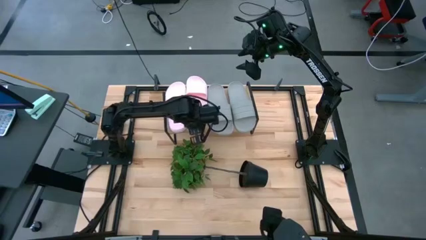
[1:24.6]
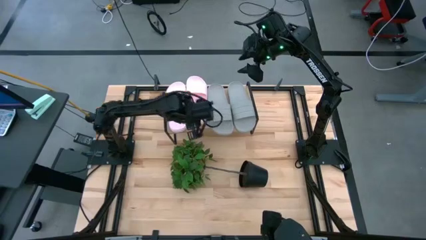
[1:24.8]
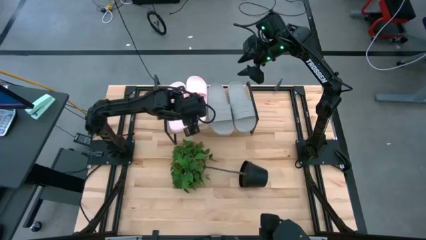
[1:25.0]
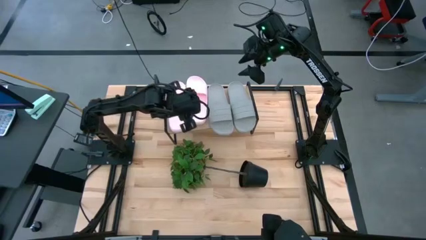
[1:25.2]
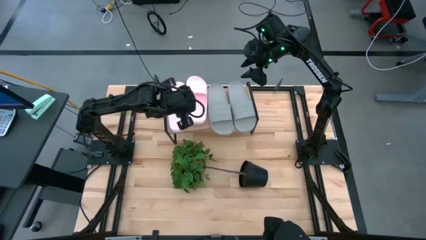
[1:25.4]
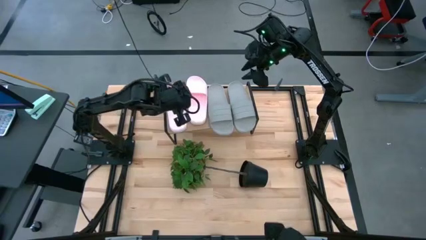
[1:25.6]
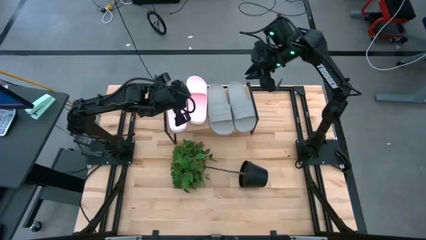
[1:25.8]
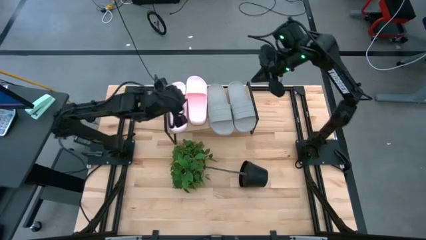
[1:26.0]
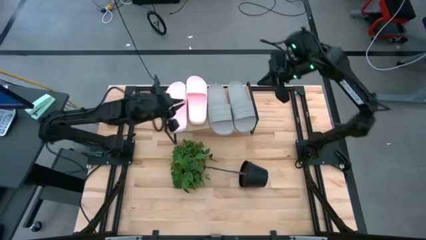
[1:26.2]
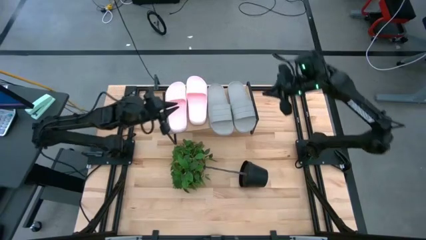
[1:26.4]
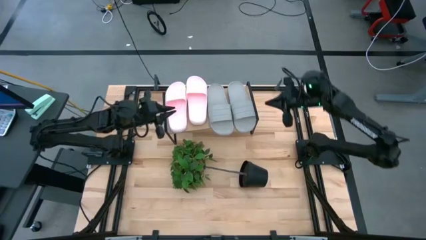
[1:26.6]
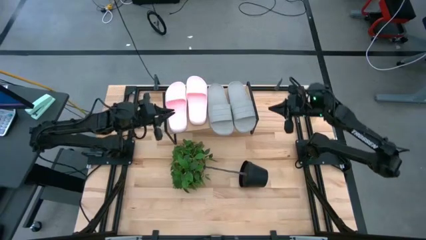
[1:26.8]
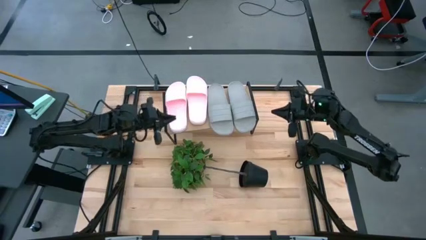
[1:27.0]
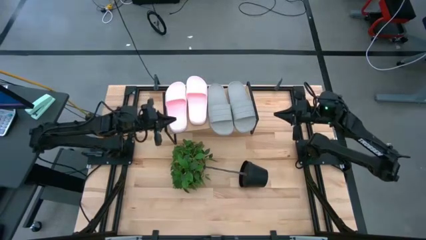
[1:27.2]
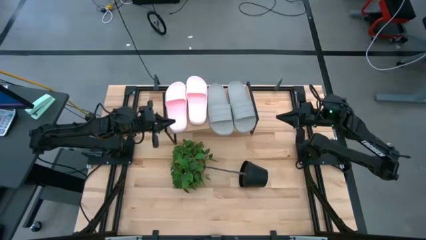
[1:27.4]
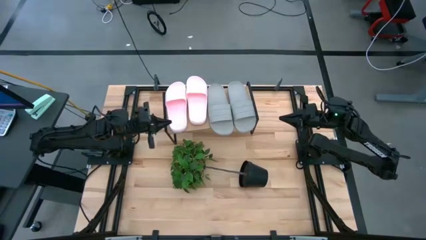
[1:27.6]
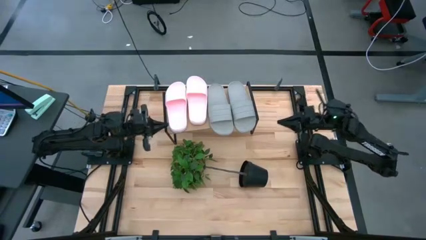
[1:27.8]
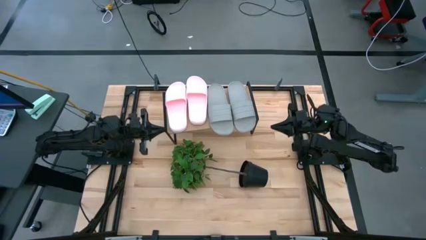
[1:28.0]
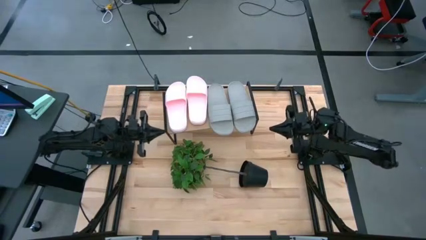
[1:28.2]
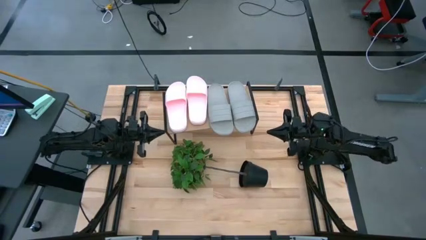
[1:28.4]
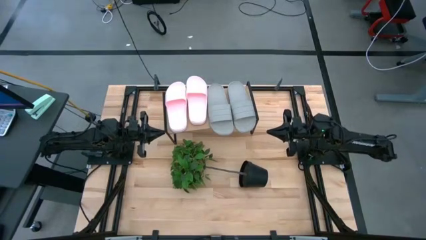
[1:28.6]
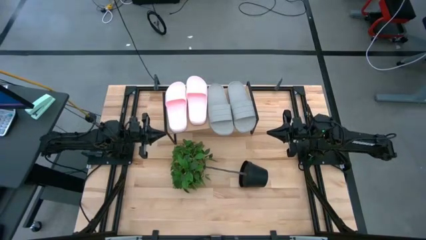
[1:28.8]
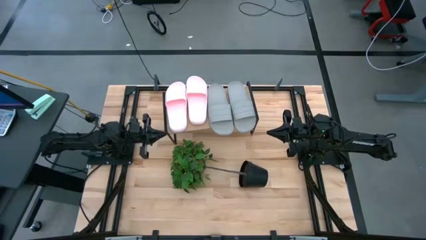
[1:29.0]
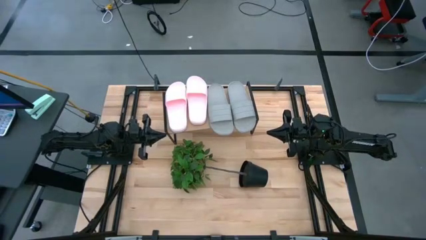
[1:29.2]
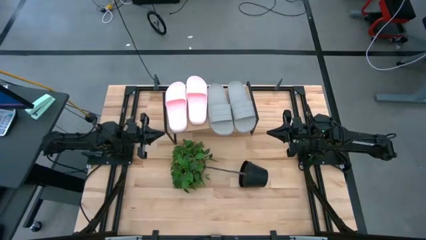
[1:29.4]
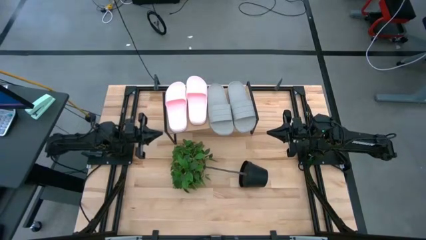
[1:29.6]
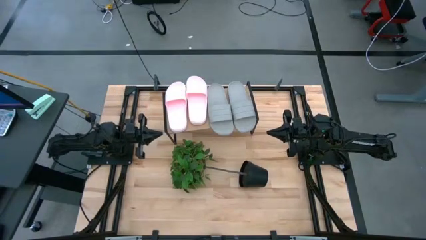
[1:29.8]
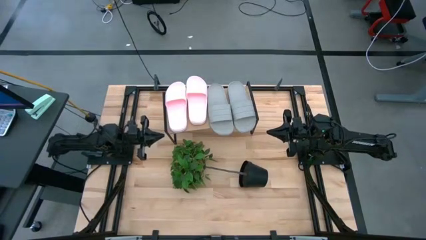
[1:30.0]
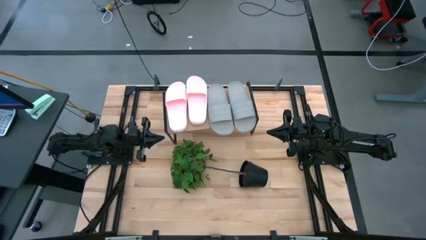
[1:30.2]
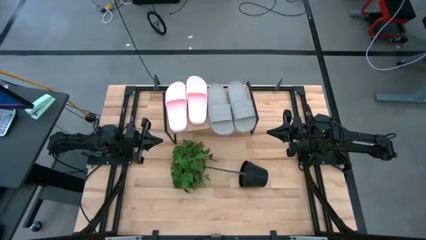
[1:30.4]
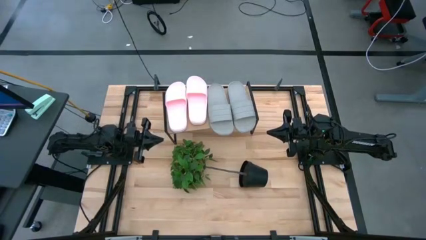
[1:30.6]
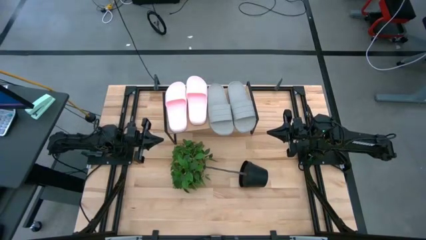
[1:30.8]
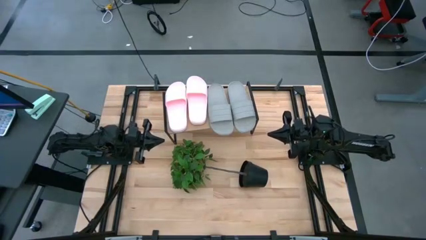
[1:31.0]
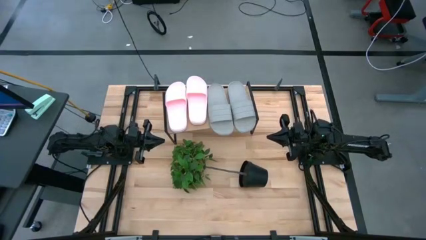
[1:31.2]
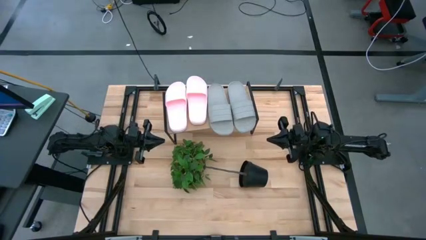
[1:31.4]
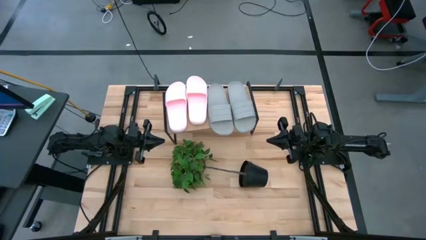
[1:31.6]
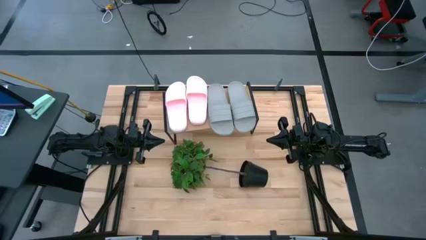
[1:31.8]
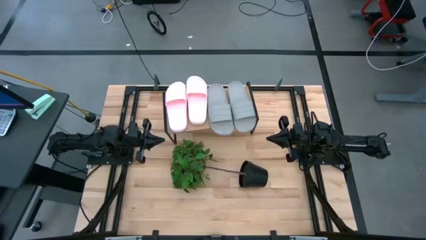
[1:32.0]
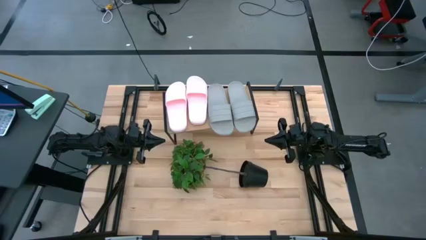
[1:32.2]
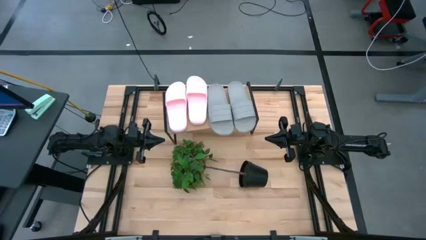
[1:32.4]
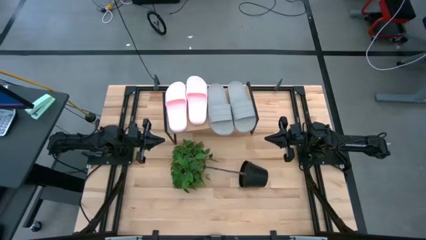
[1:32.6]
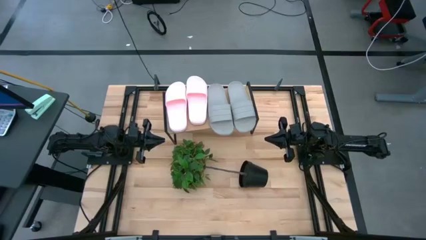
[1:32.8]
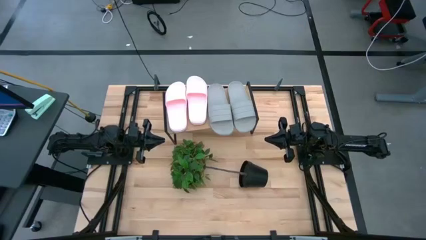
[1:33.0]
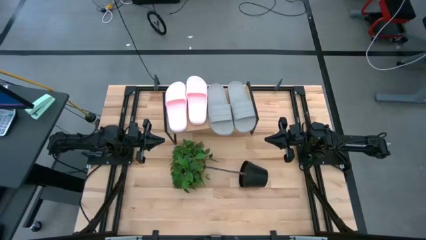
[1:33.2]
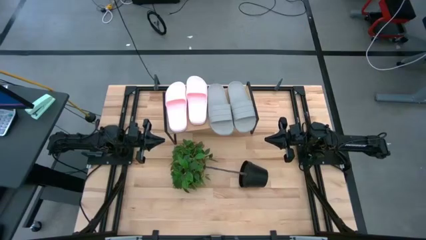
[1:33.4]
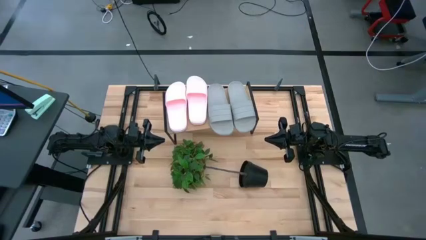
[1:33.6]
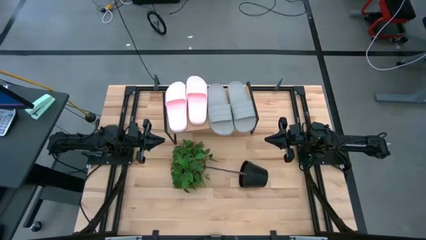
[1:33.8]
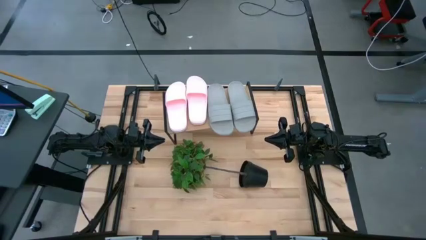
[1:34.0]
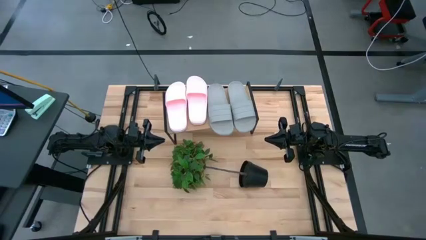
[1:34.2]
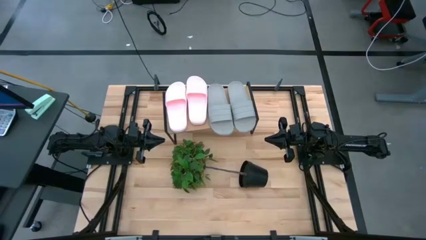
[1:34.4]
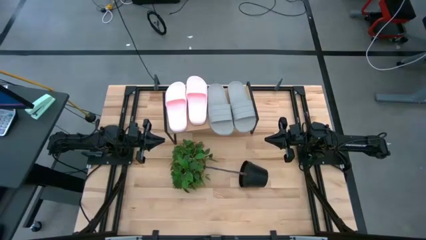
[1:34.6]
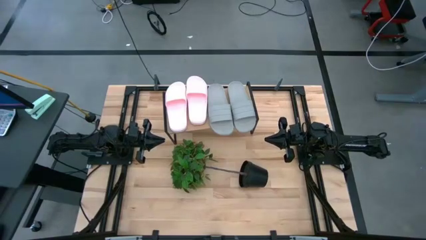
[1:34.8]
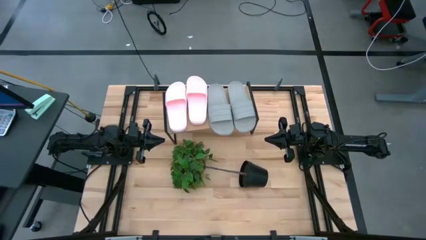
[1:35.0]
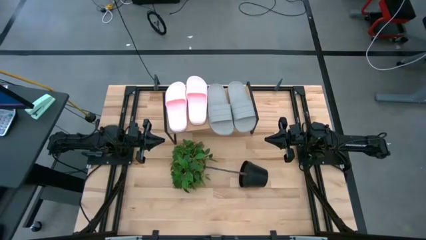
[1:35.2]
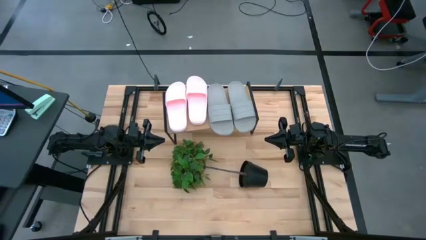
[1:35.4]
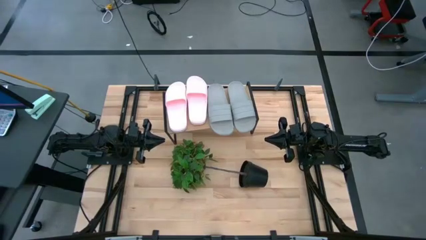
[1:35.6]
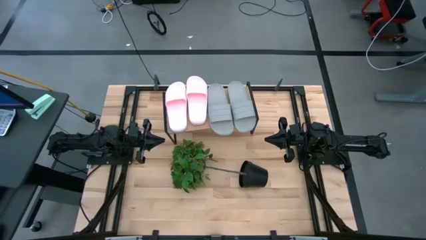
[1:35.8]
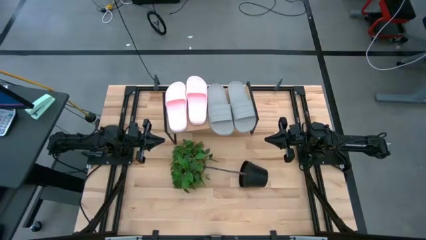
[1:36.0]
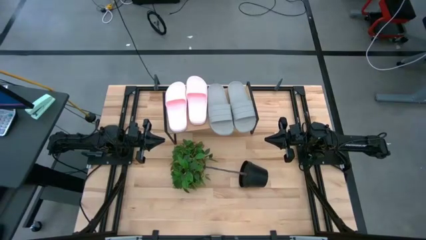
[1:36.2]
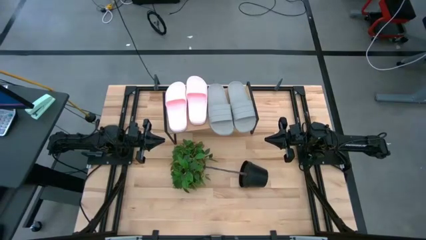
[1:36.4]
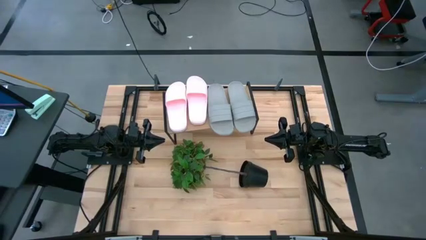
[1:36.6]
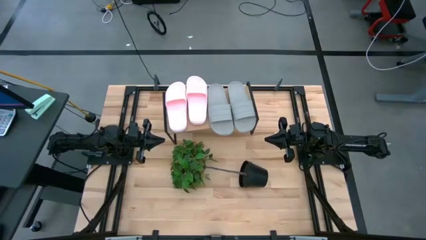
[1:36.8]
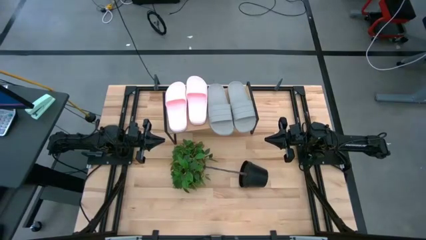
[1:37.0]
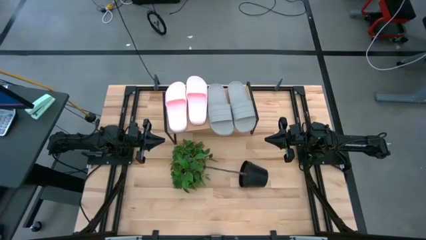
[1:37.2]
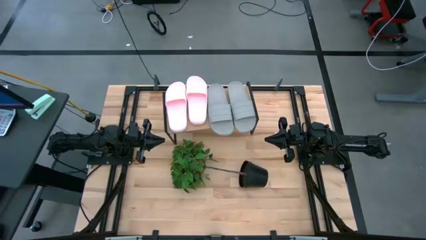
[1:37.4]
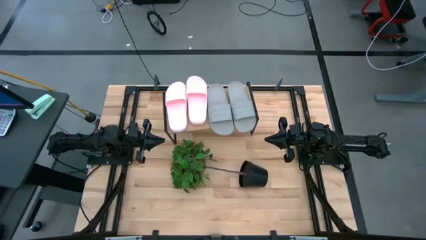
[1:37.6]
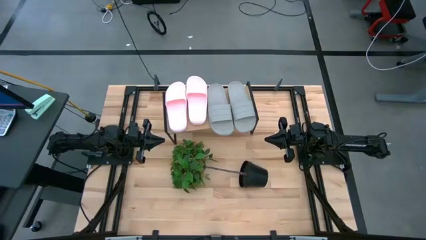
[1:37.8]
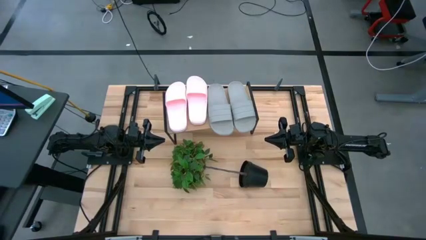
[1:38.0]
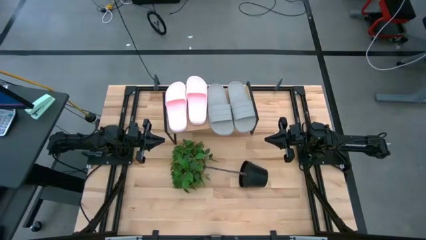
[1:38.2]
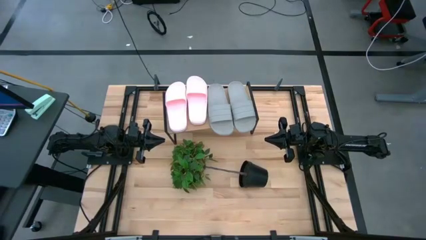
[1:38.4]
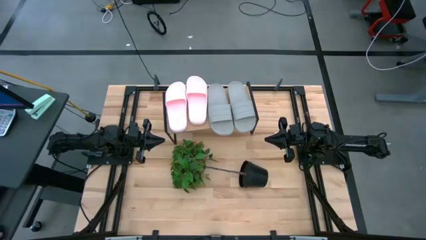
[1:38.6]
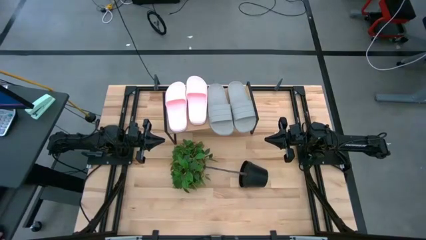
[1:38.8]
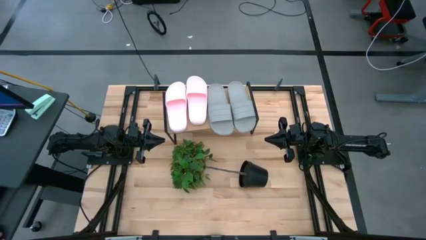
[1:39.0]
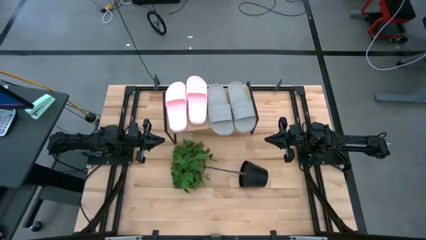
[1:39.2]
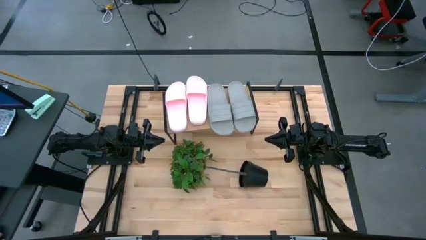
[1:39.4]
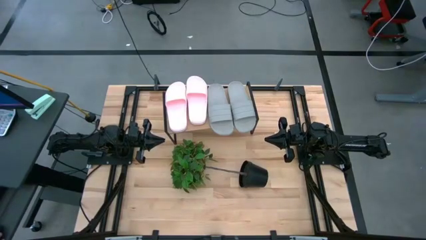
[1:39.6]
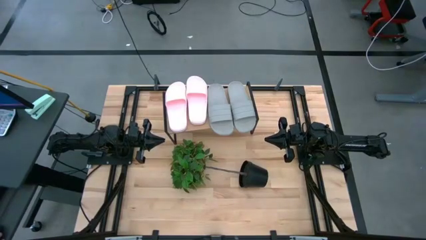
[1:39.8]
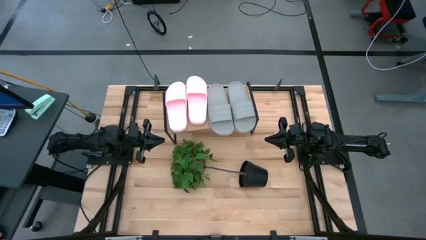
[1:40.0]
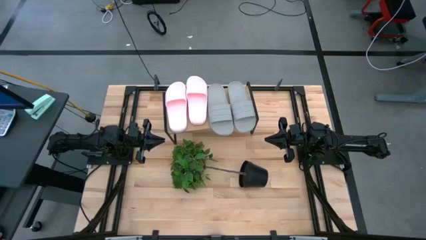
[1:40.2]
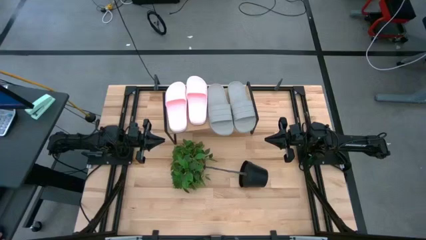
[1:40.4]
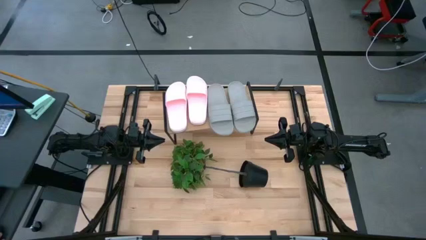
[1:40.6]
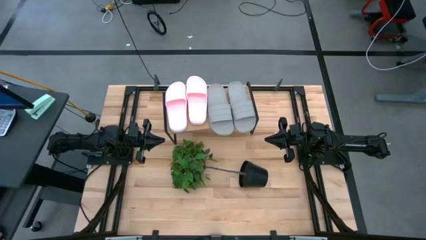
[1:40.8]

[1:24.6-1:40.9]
Task: Pick and place slides into the shelf
Return to Home Position
